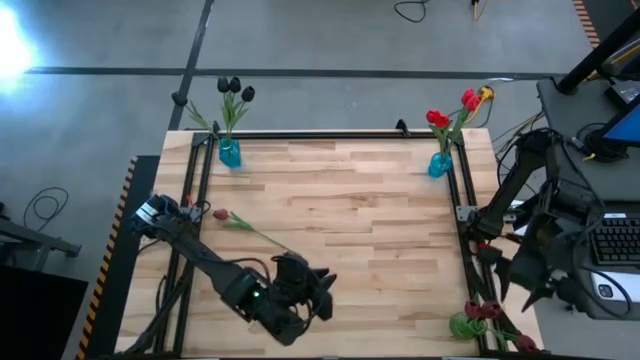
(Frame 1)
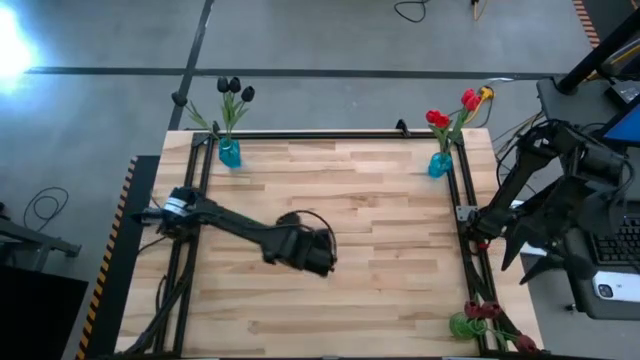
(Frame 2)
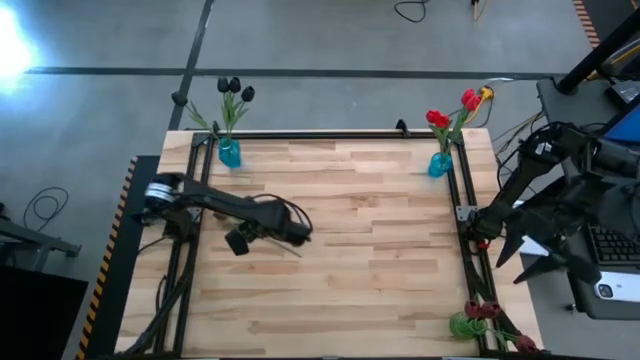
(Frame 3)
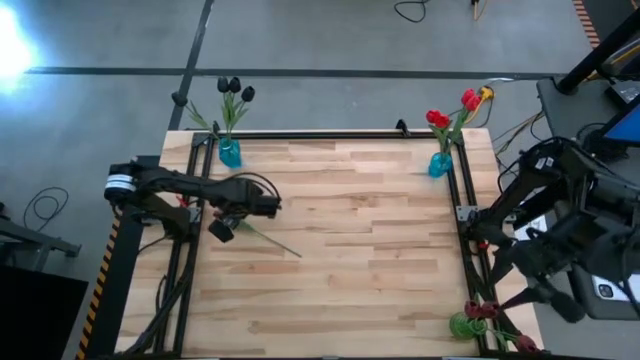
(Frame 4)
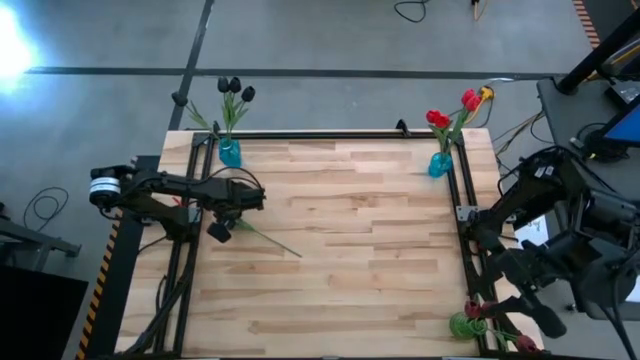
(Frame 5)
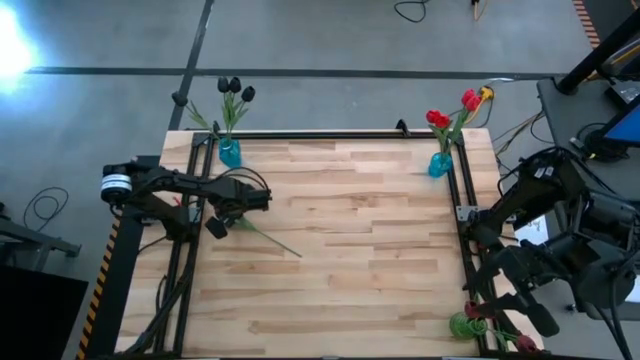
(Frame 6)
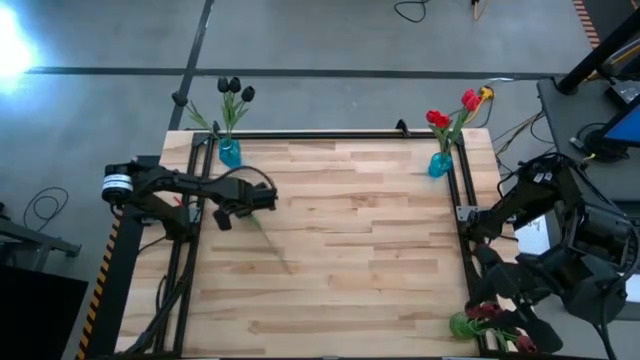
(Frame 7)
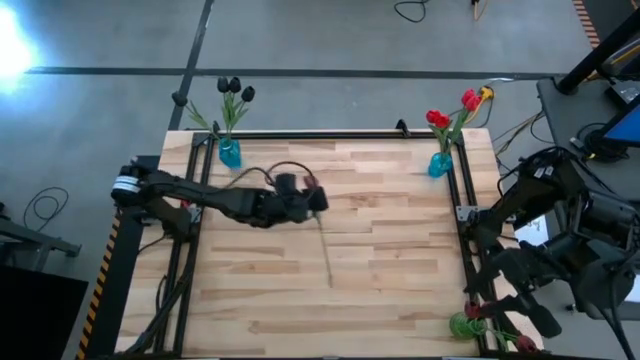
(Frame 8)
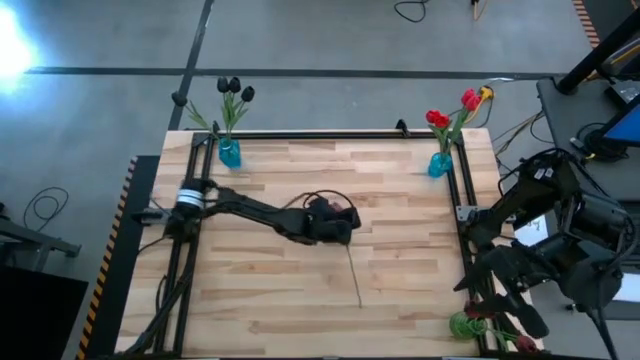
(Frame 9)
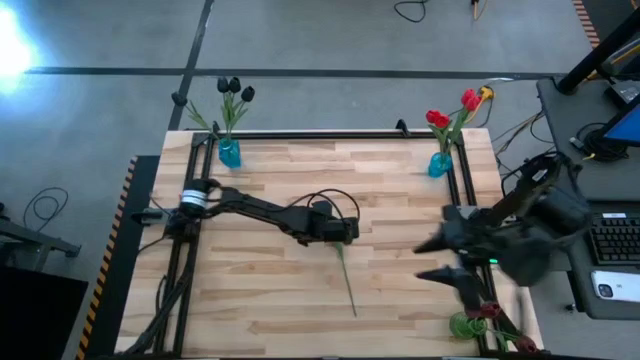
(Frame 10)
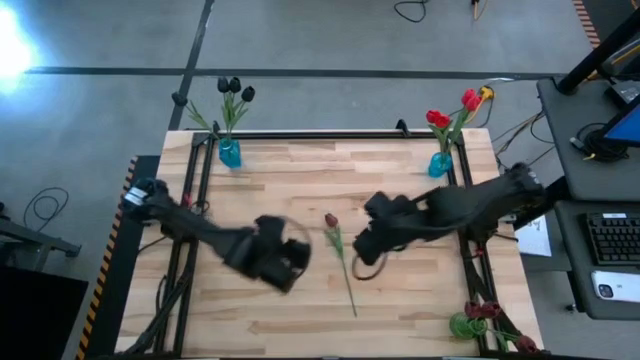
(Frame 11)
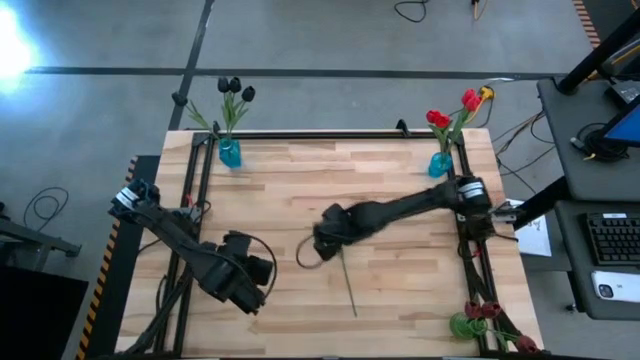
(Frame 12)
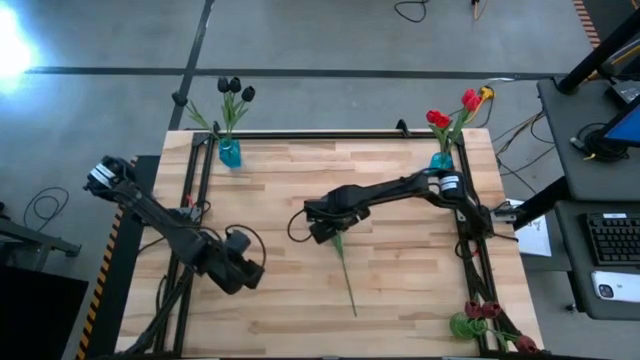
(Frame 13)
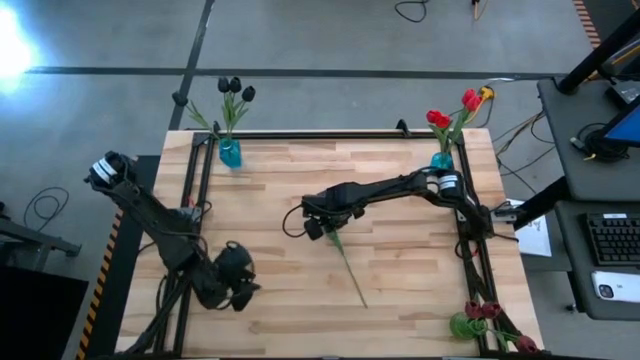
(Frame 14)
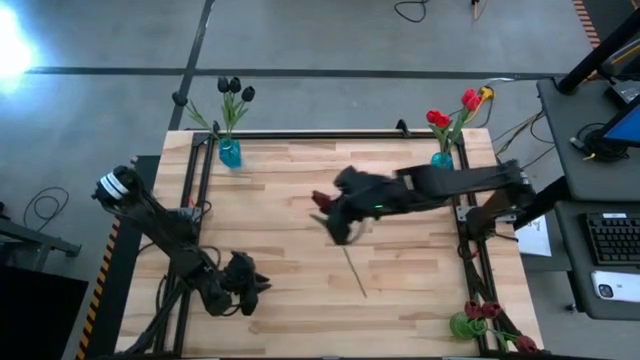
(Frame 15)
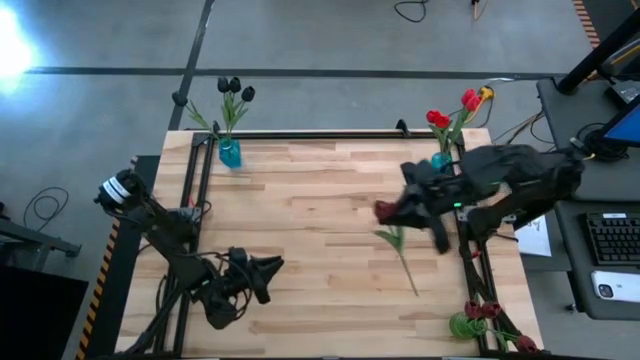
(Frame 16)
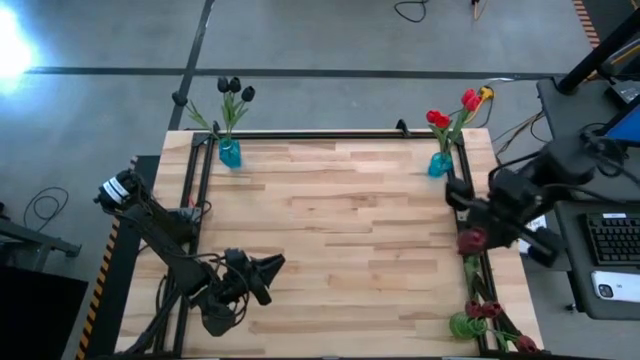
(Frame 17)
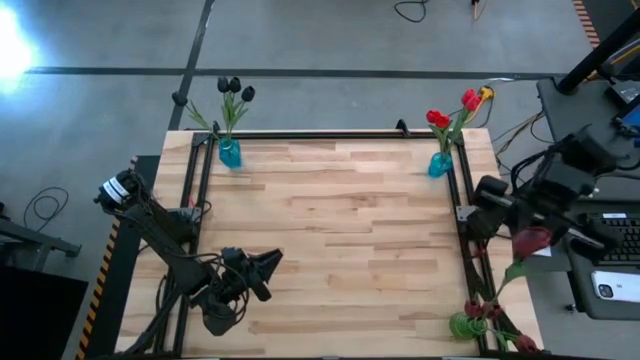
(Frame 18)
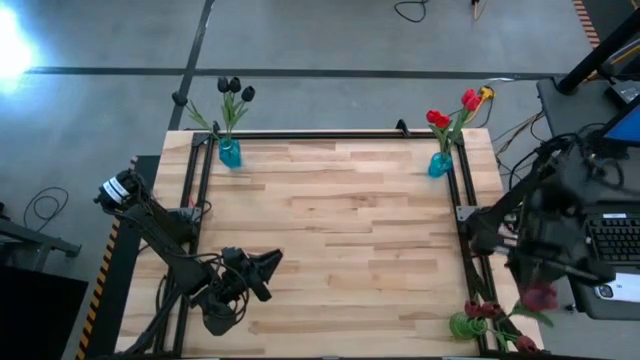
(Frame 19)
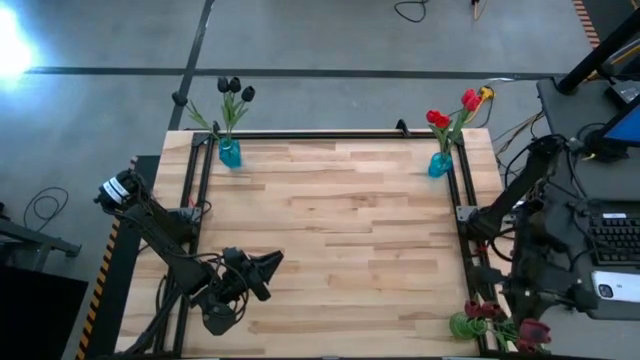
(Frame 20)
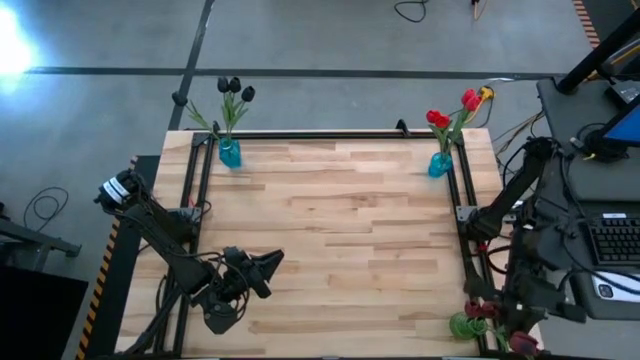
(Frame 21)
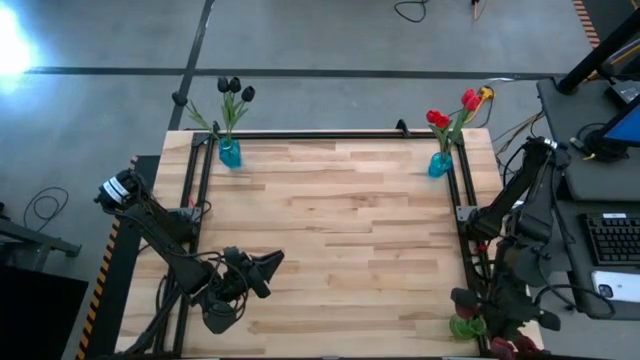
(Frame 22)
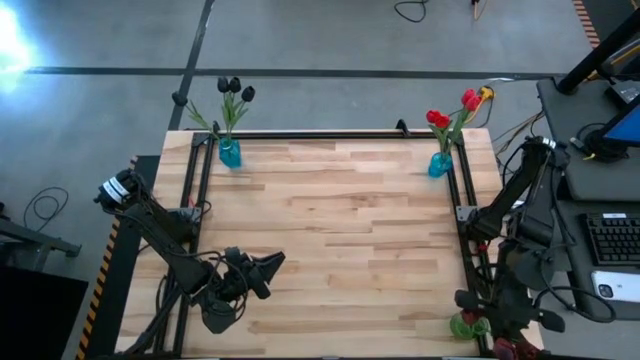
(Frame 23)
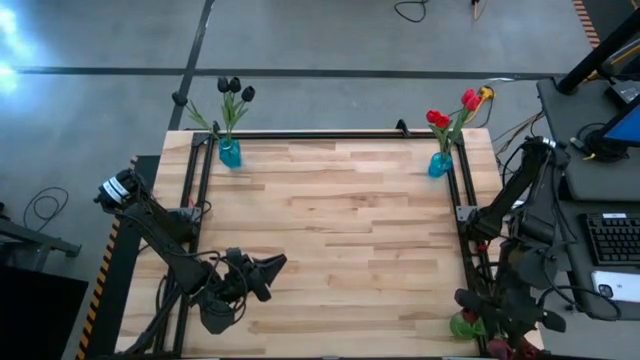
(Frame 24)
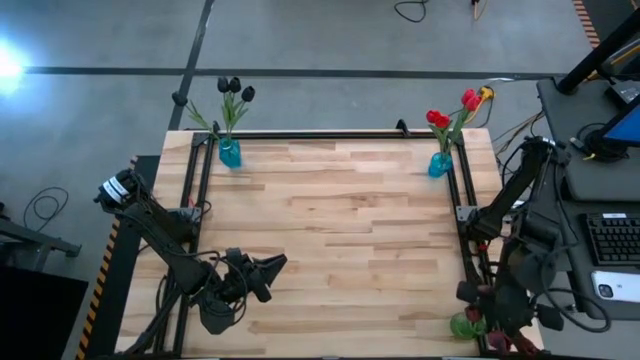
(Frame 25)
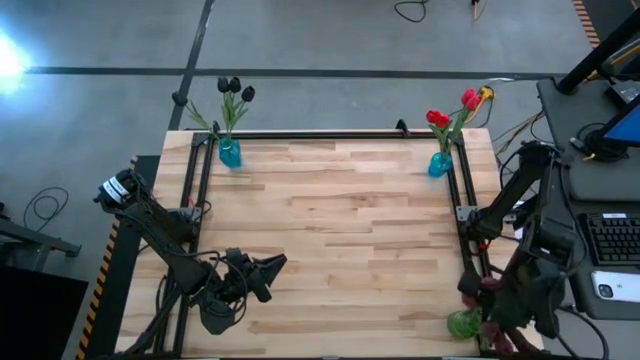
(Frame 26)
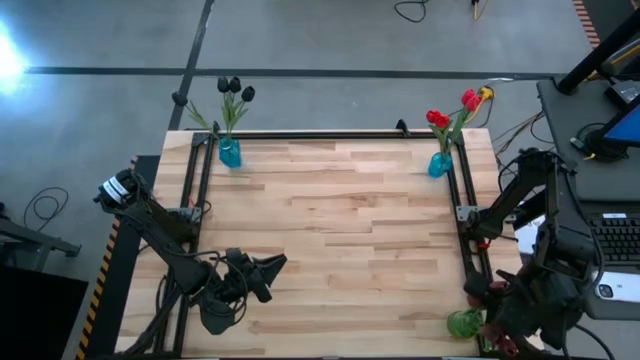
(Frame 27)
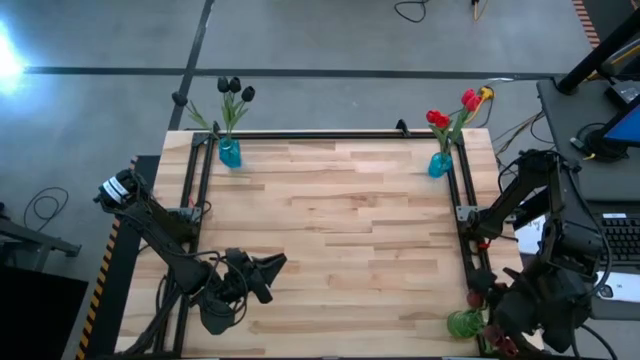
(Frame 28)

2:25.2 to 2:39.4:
Task: Sort flowers into vase by color
Put the dark red tulip into the green vase

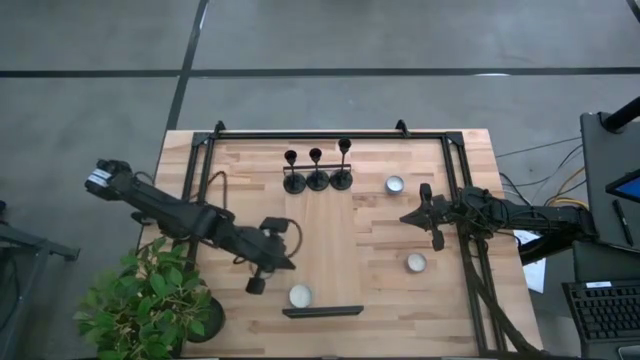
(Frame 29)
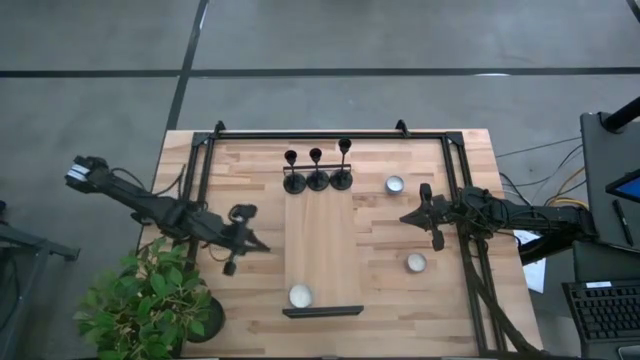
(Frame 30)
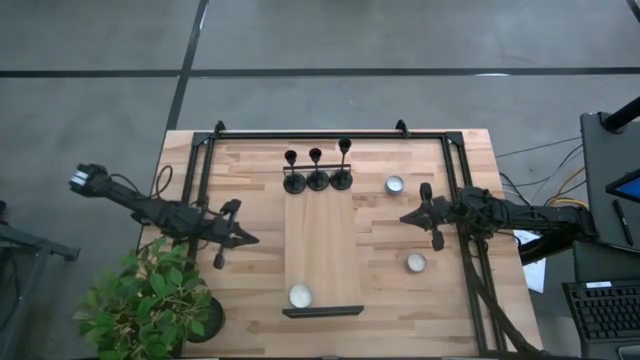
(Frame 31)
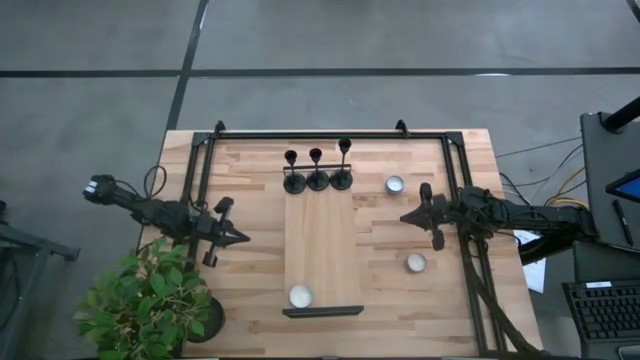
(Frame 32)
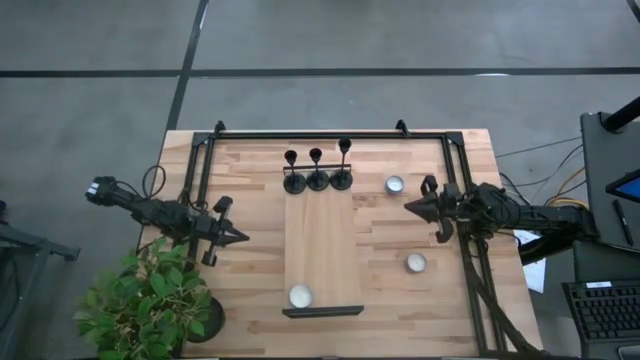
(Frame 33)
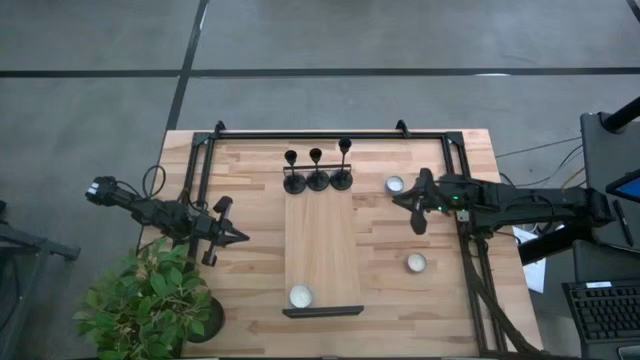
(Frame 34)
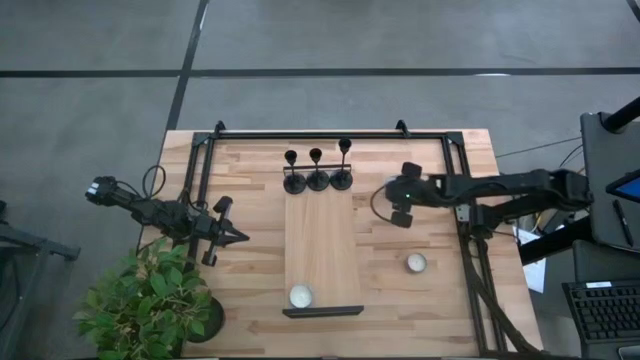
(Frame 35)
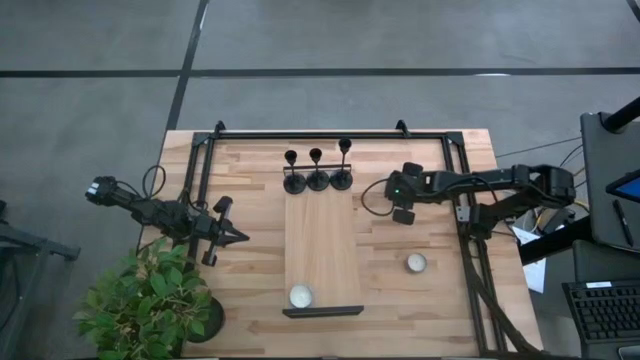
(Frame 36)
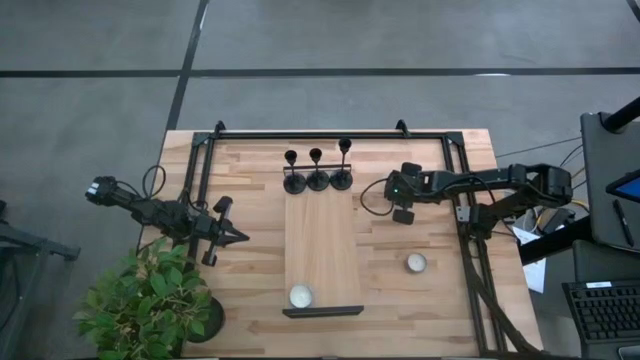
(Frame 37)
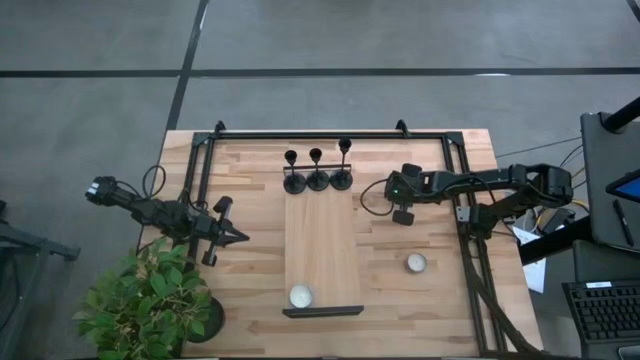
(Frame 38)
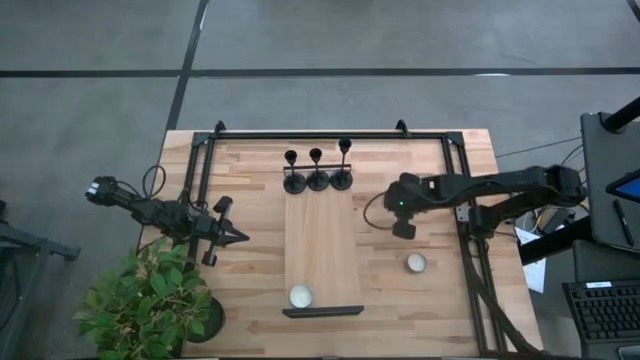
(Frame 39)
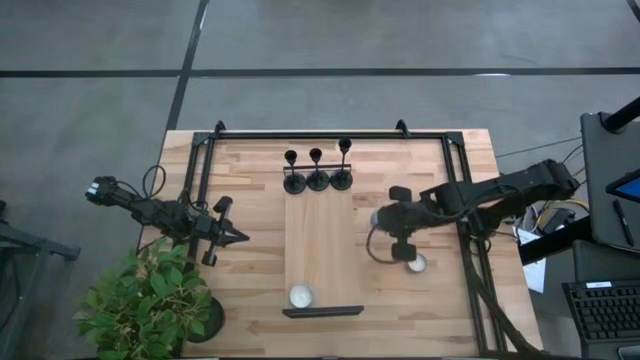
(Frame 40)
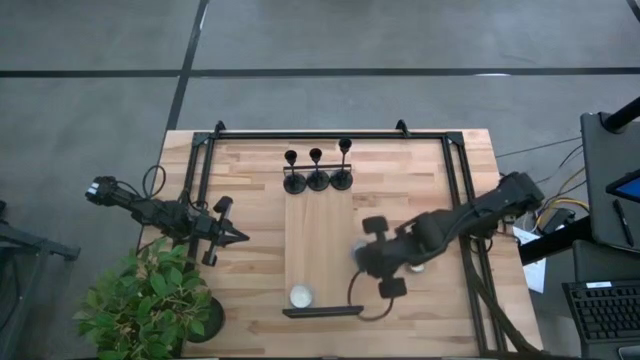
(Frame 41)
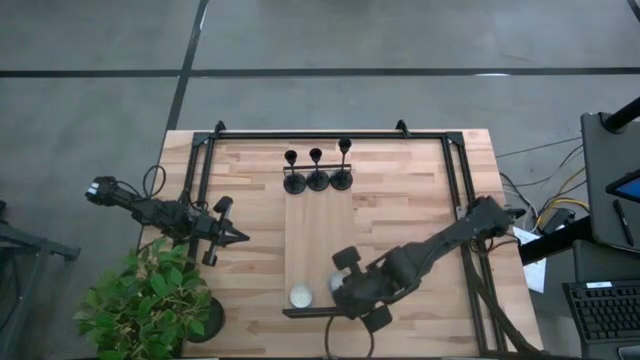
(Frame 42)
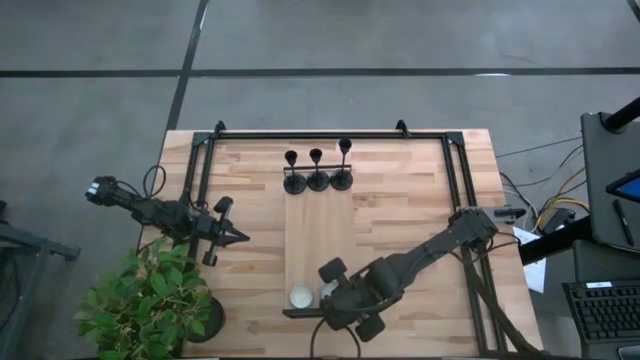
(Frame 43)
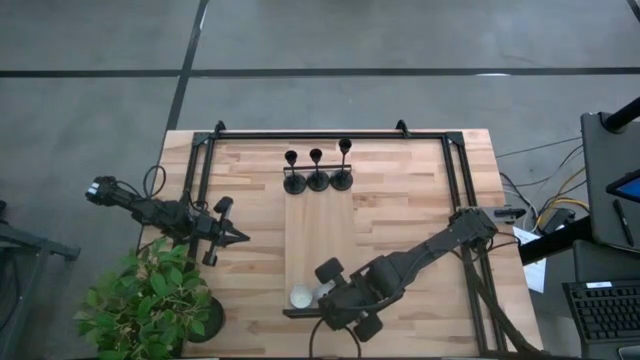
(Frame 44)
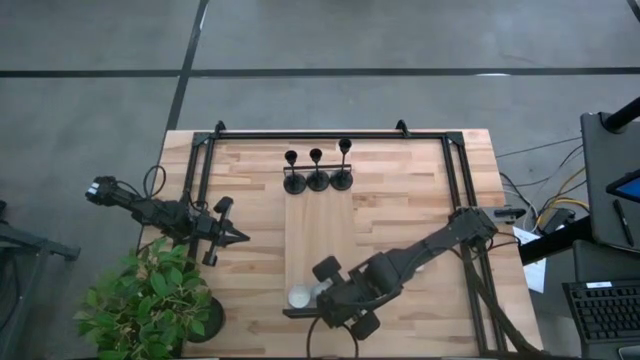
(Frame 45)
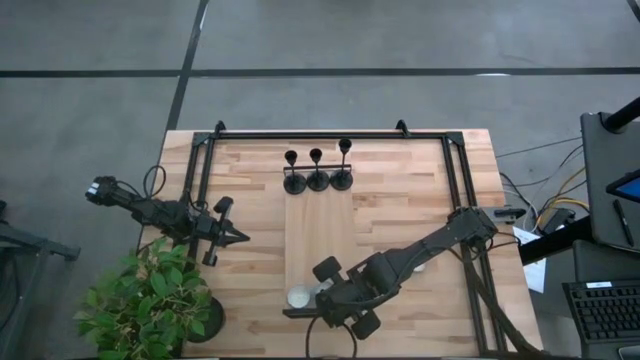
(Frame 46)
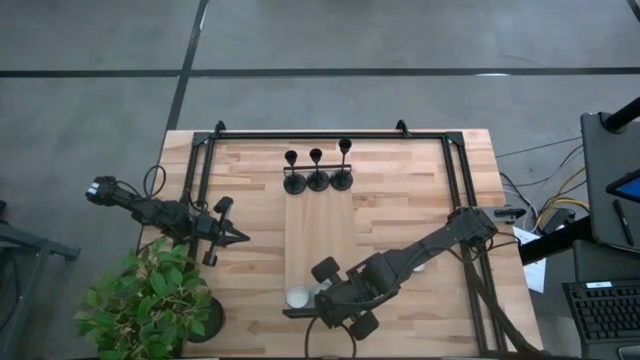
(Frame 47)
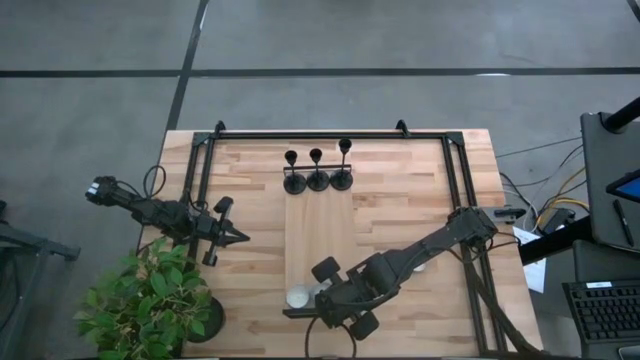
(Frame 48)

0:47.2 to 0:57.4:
Task: Pick & Place candle stick holders
Put the blue patterned scented candle on the shelf aligned with the other red patterned scented candle
